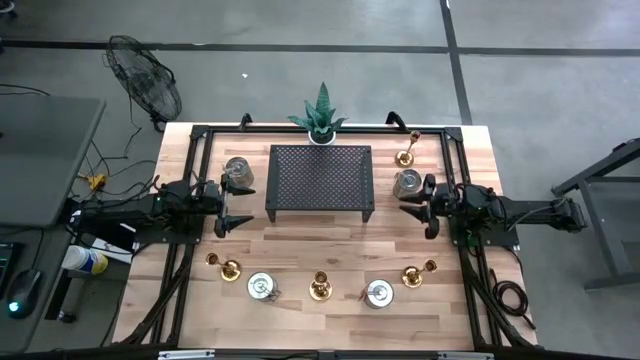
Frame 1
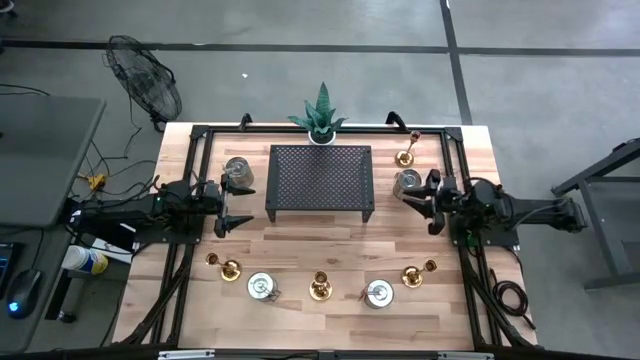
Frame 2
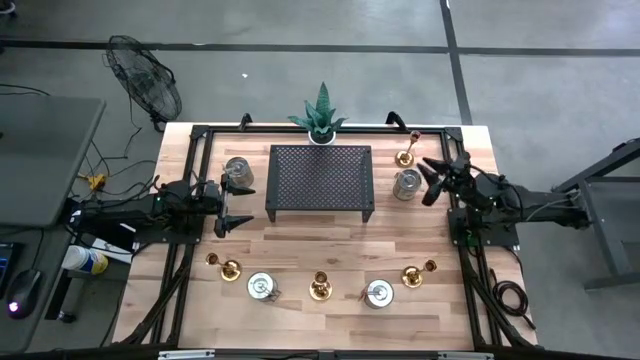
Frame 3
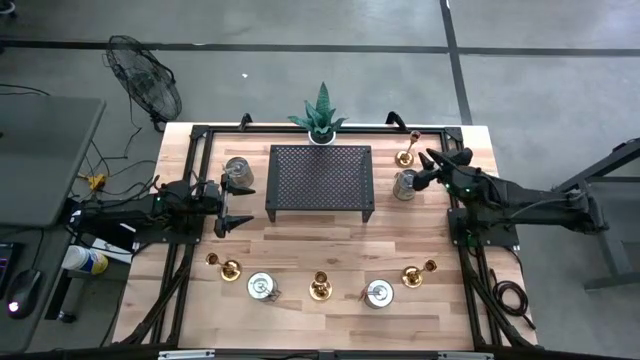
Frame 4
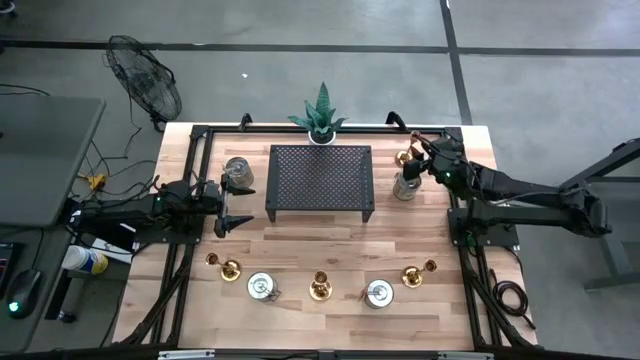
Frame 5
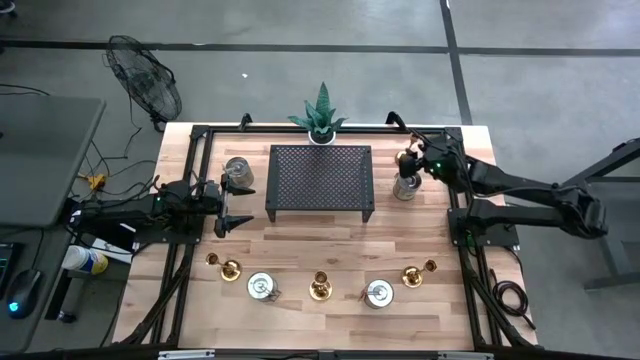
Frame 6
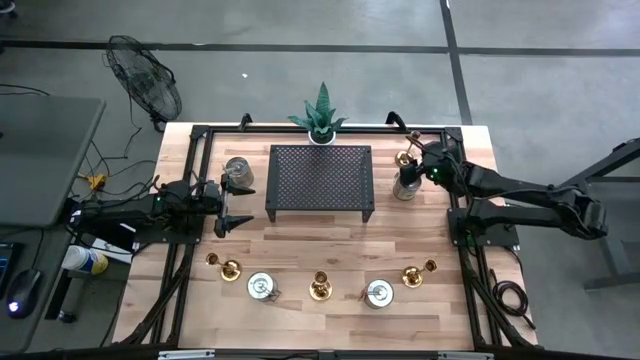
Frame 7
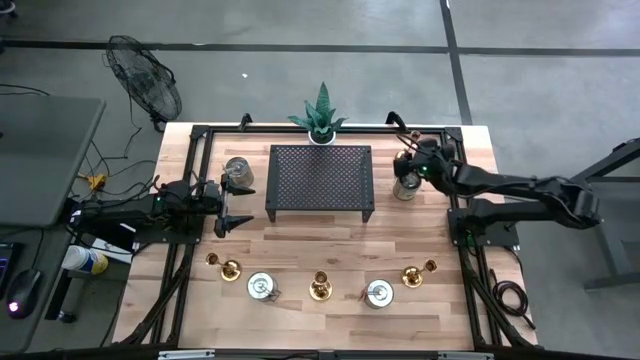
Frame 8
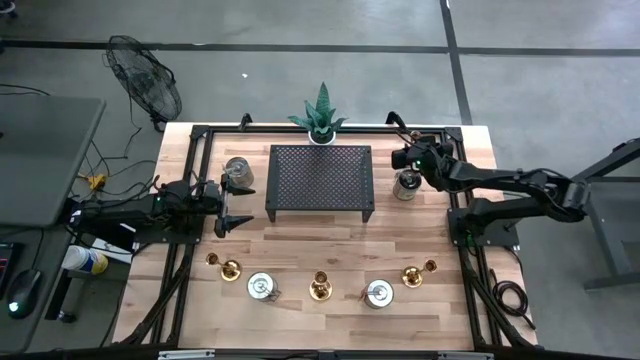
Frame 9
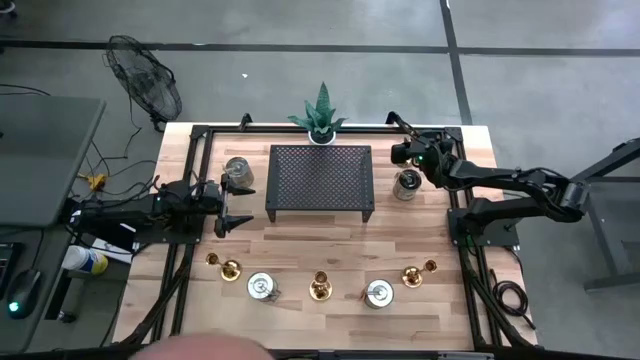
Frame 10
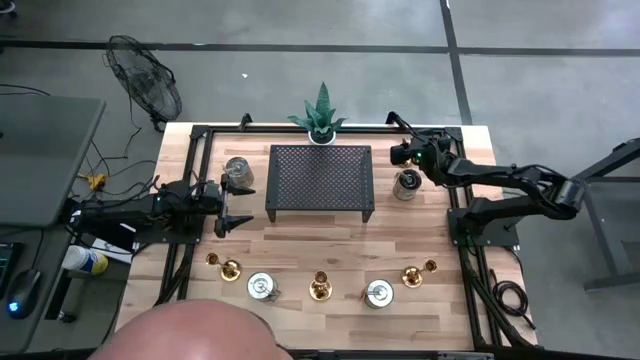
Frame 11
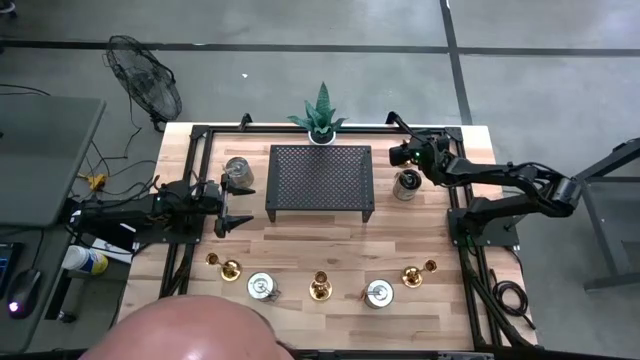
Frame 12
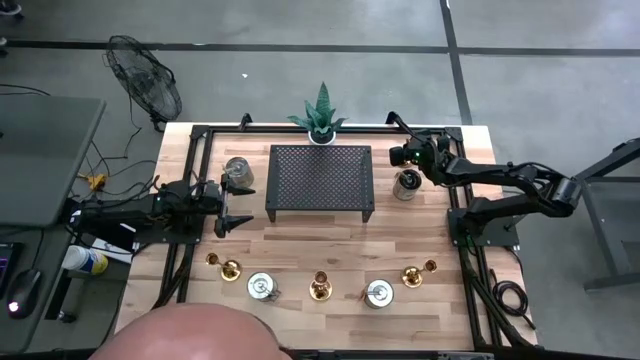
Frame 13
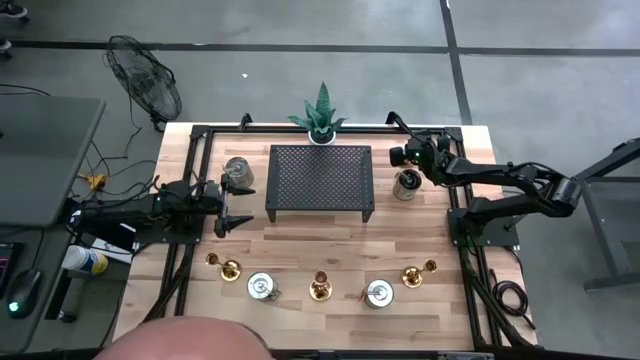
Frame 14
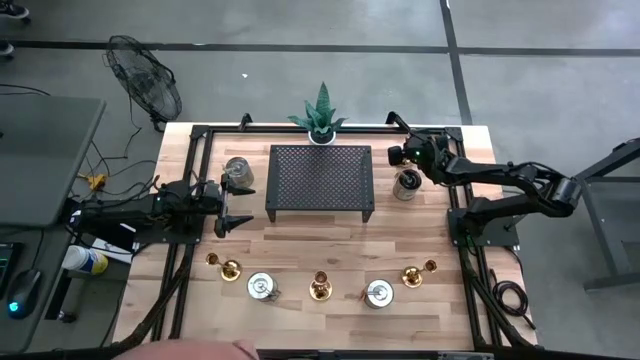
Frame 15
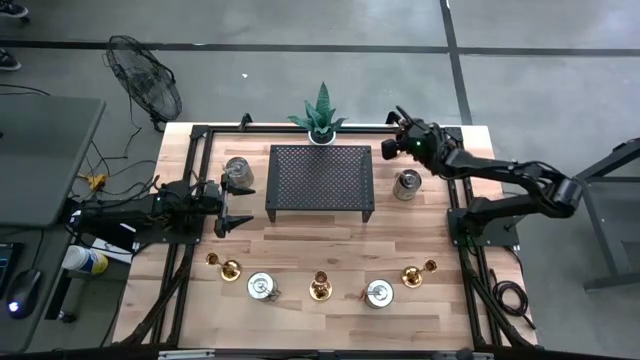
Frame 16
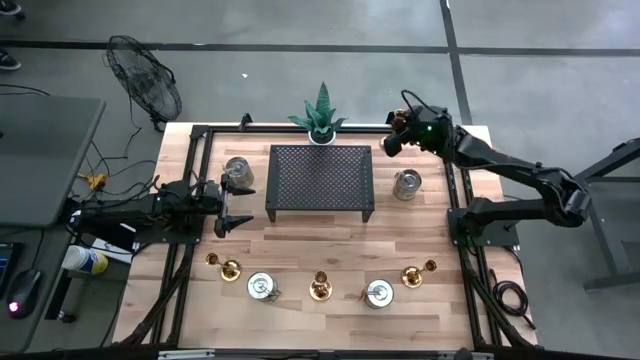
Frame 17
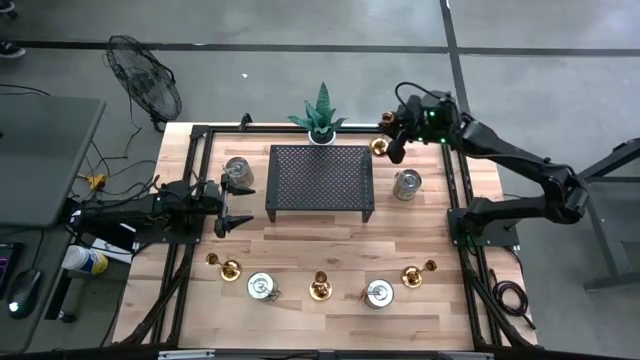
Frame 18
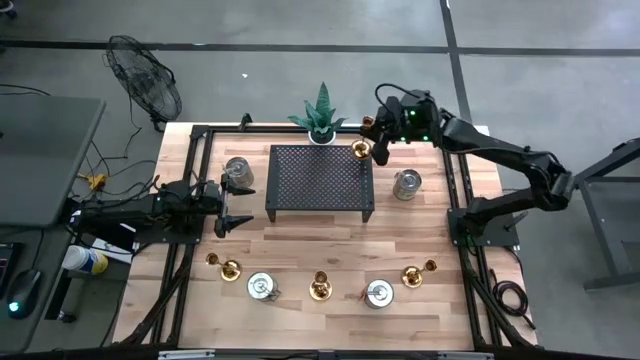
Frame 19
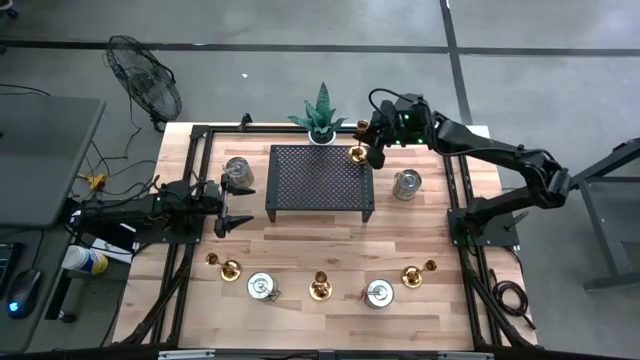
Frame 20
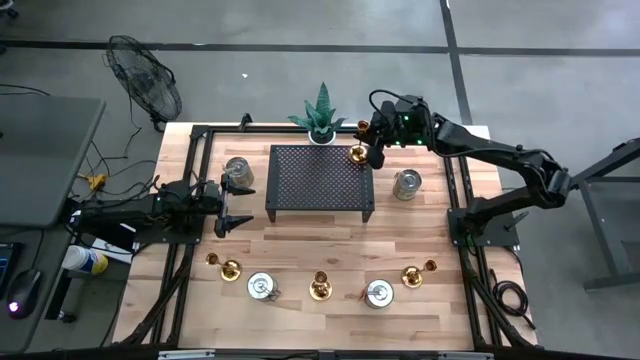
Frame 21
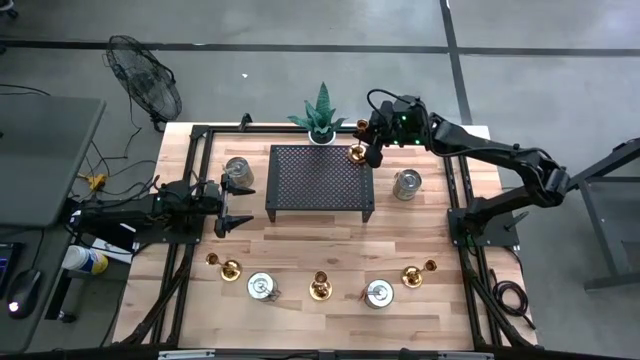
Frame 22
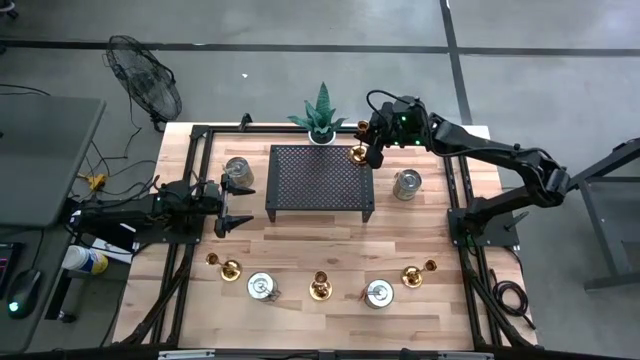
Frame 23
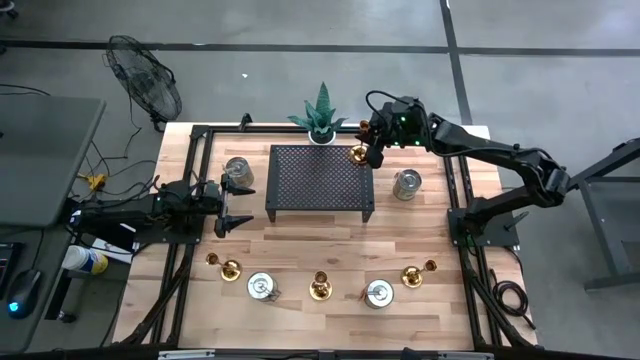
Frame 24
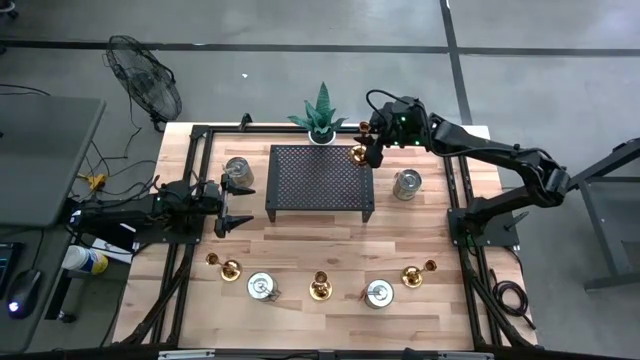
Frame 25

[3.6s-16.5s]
Task: Pick & Place candle stick holders
Put the gold candle holder on the shelf

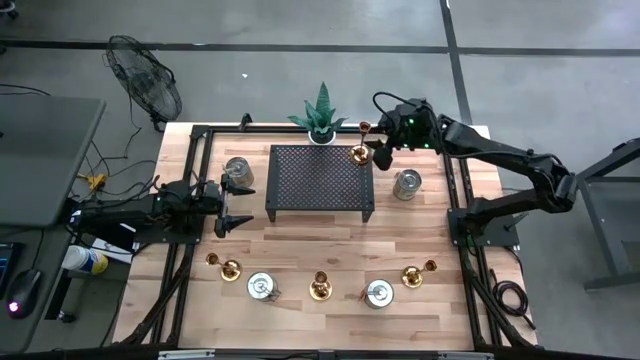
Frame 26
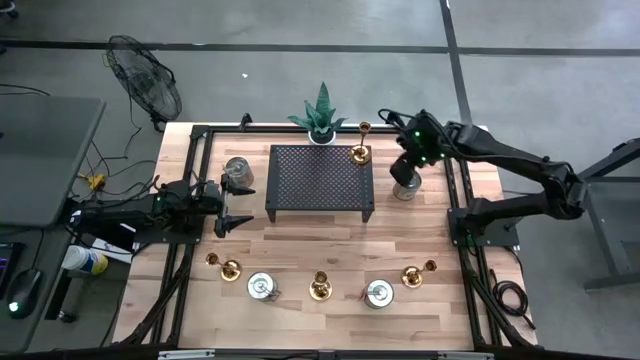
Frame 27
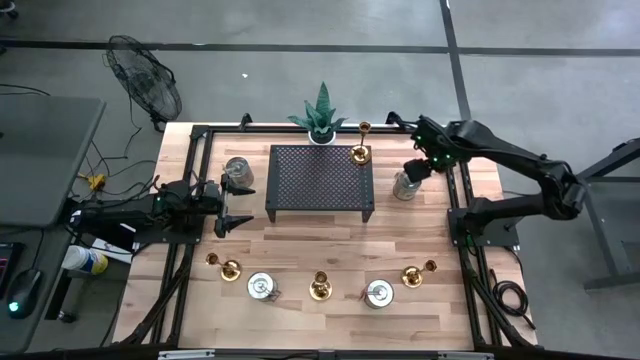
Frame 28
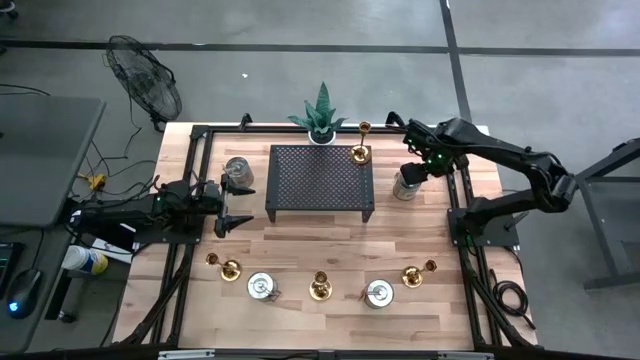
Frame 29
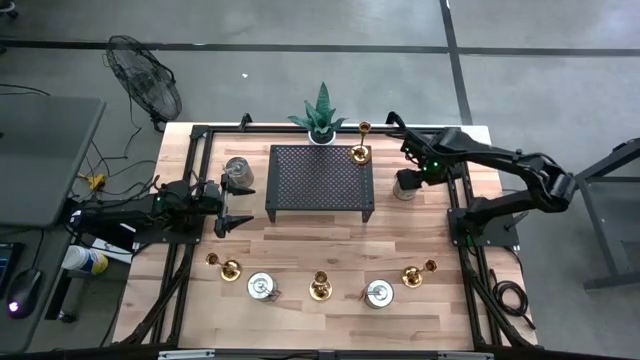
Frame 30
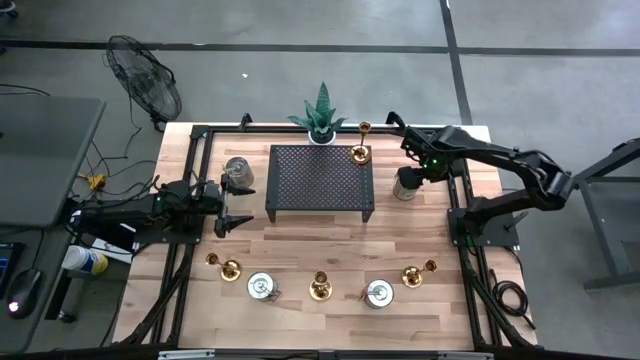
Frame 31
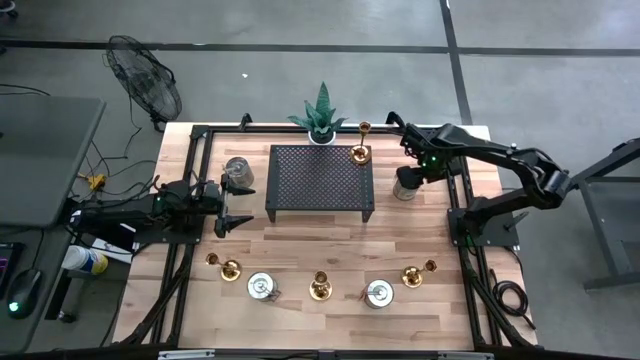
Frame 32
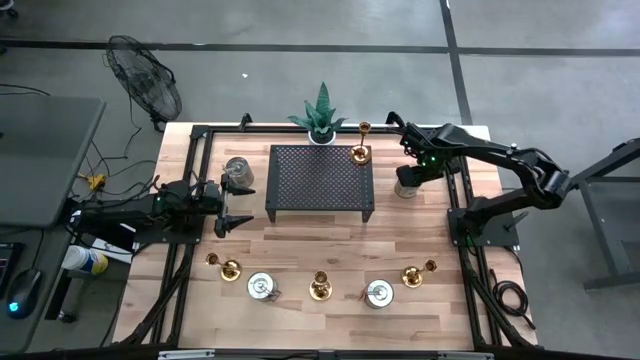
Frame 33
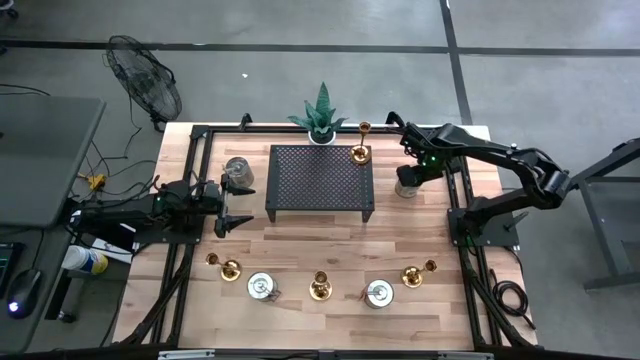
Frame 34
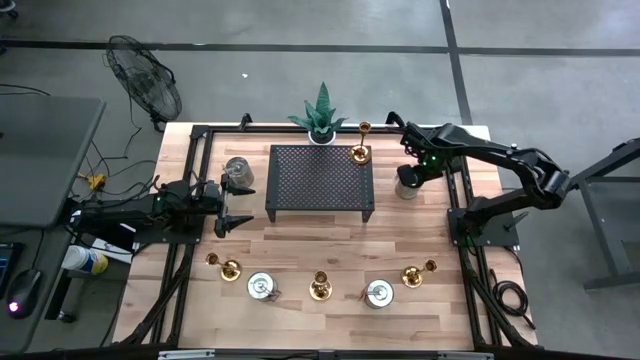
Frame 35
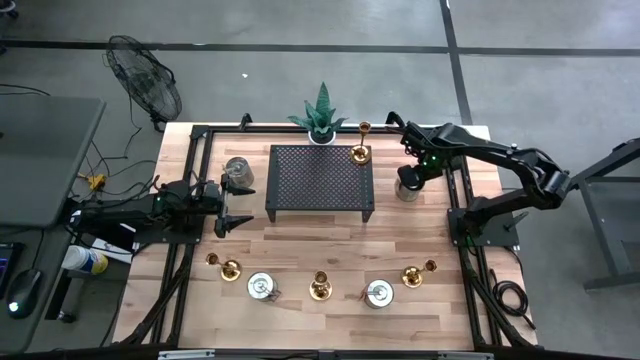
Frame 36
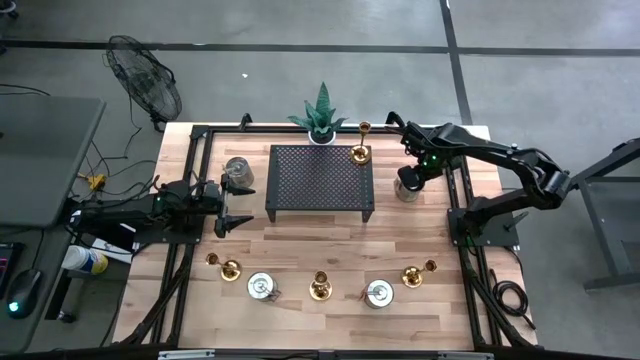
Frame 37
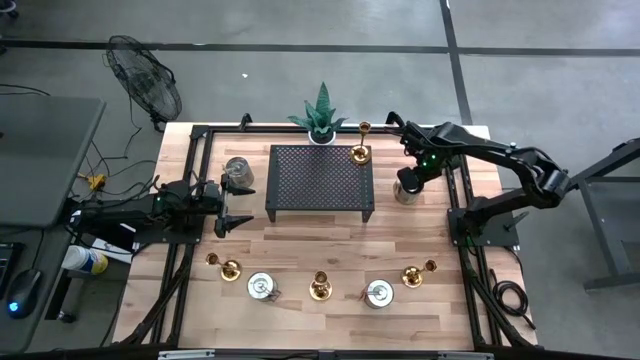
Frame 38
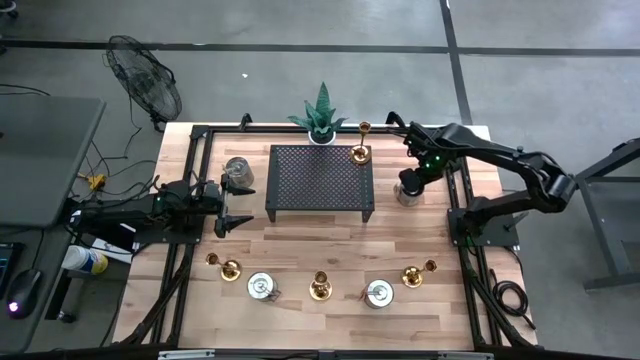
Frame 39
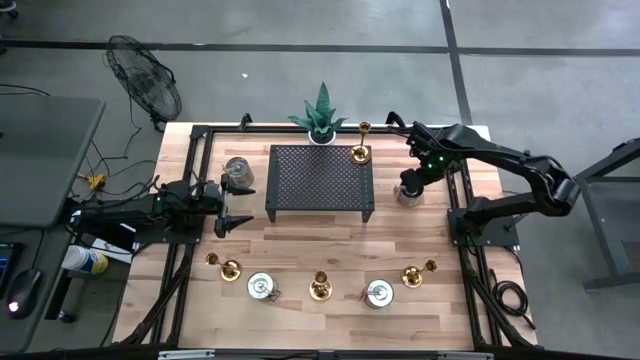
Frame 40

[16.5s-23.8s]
Put the silver scented candle on the shelf
